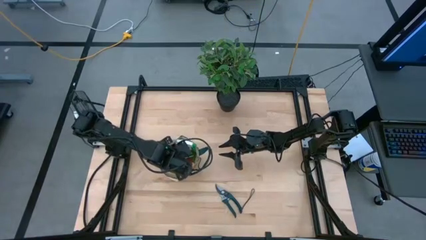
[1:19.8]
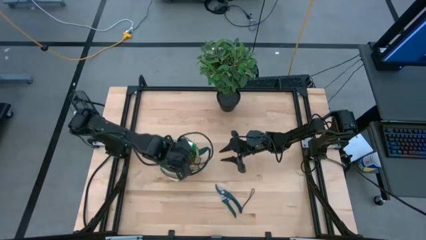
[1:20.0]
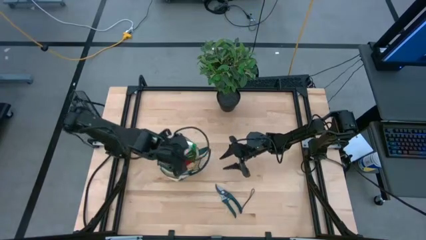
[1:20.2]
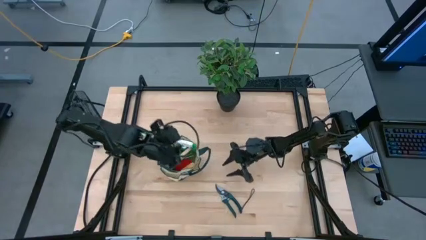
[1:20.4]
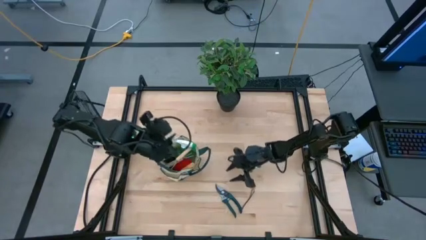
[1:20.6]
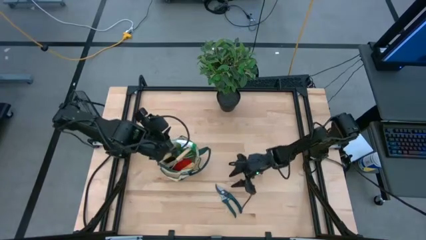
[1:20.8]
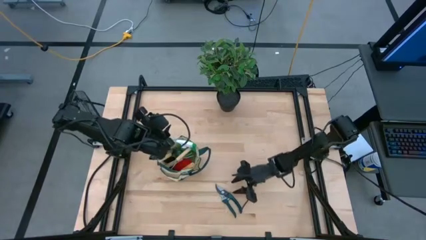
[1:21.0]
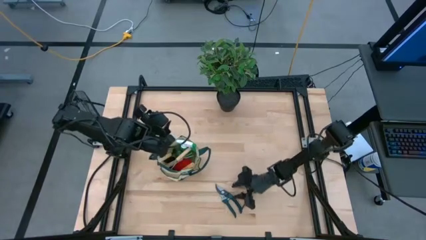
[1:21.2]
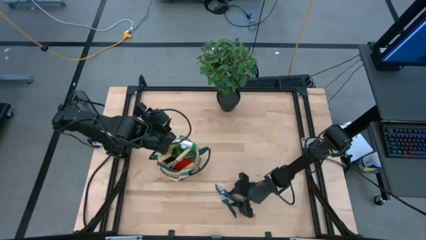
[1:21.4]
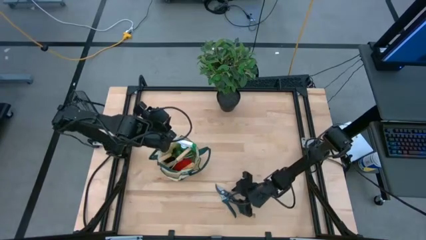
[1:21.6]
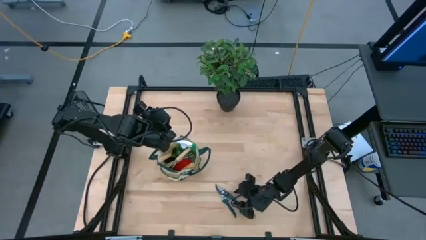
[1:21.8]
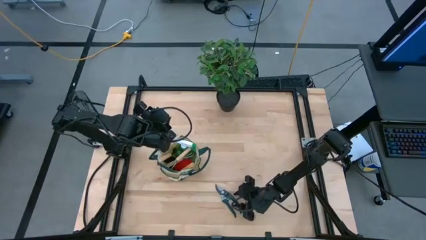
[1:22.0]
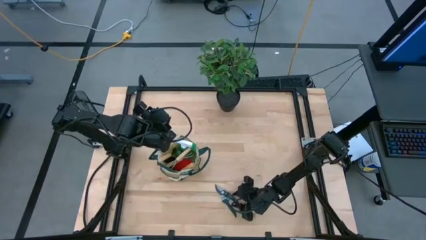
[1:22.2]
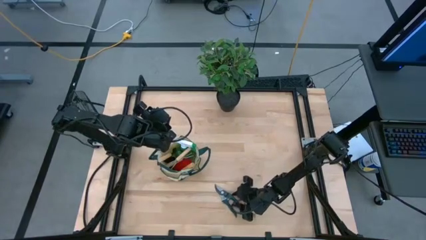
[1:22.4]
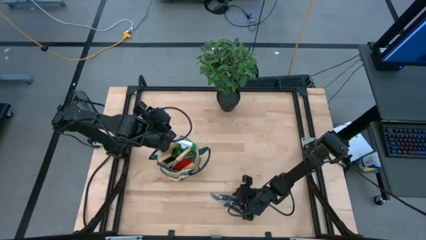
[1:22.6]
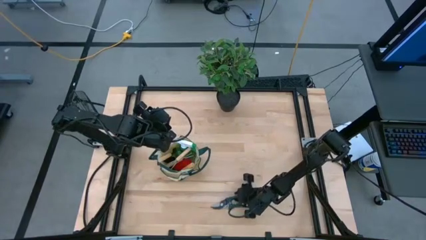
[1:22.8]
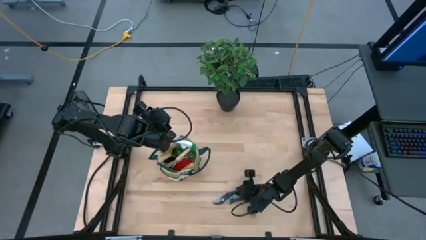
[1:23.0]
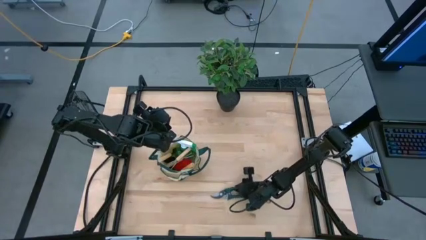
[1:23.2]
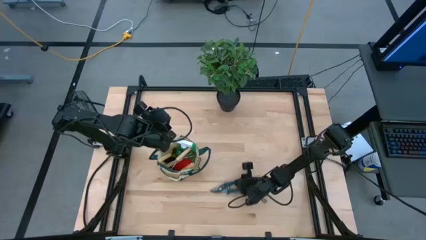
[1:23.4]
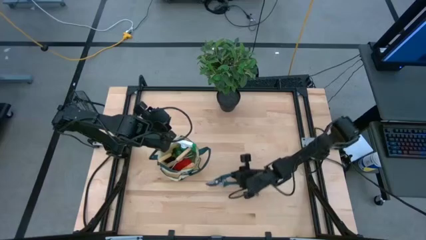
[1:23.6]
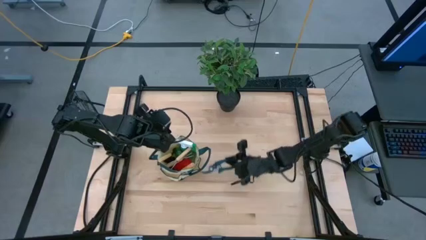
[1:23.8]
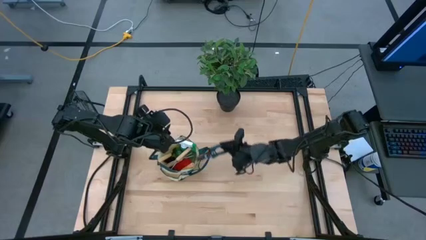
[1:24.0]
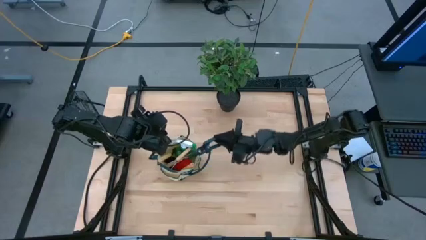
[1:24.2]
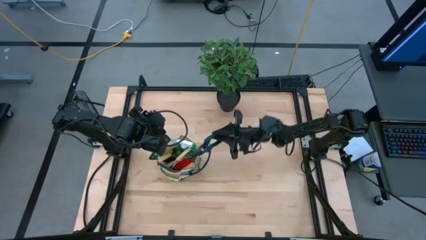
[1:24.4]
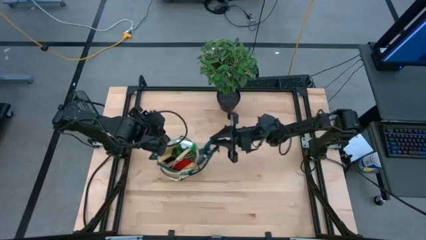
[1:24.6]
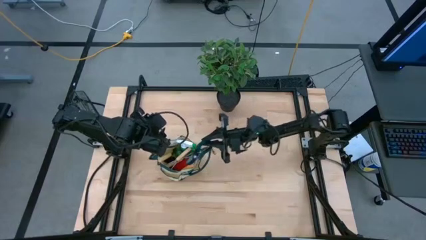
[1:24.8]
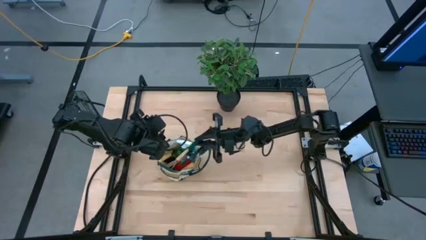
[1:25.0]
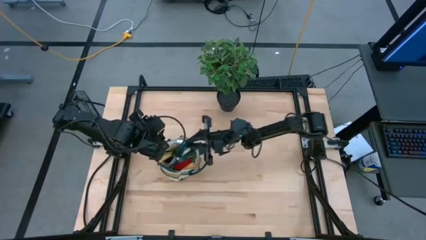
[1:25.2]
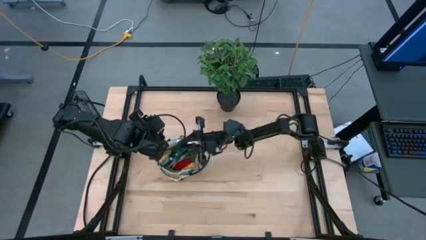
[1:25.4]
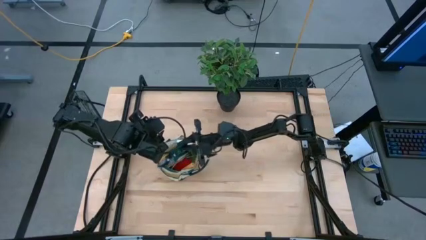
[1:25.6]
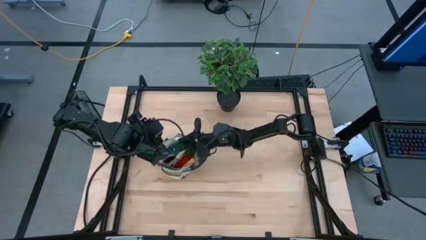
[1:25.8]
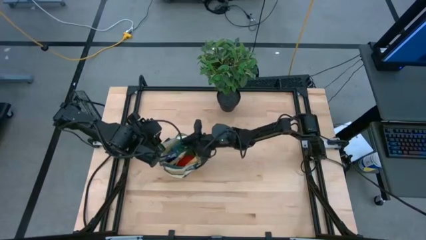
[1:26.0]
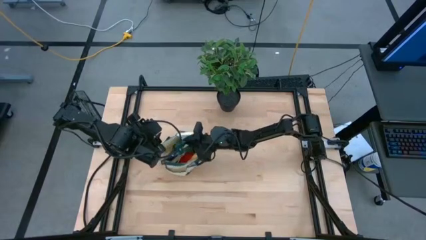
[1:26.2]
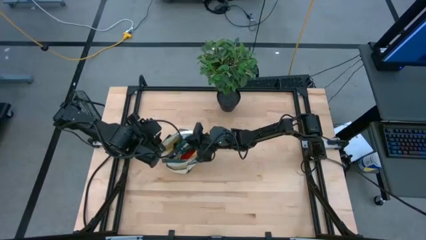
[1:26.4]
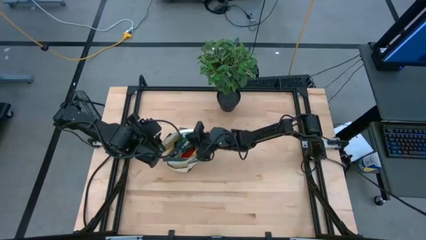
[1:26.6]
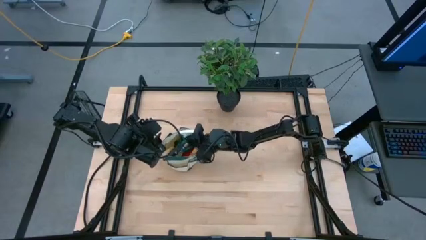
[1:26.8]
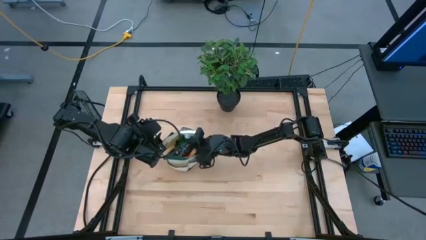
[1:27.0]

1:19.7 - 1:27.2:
Task: Pick & Place Garden tools in Gardening bag
Put the shear scissors in the gardening bag

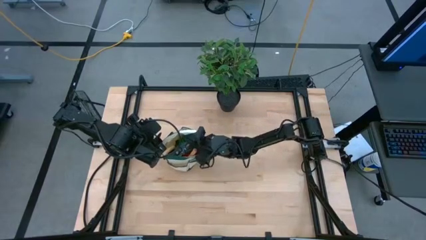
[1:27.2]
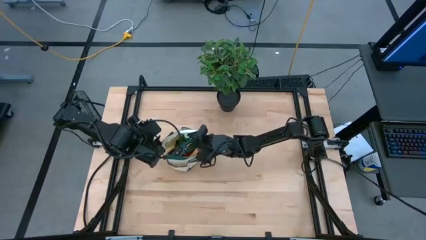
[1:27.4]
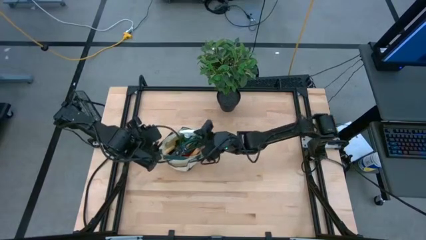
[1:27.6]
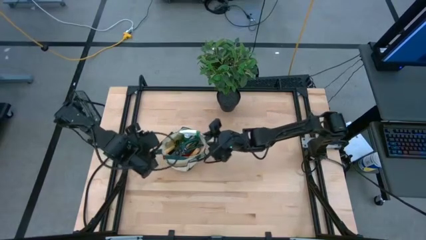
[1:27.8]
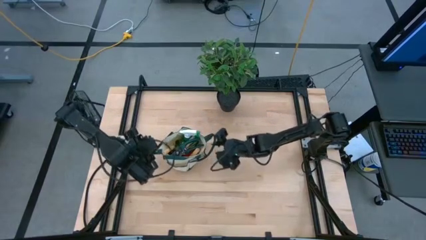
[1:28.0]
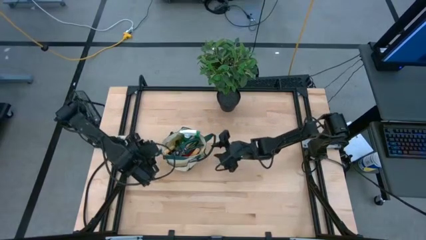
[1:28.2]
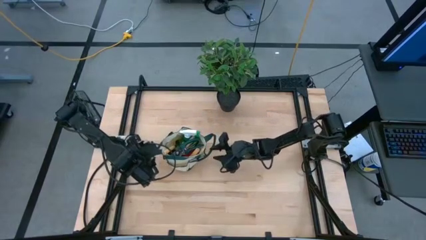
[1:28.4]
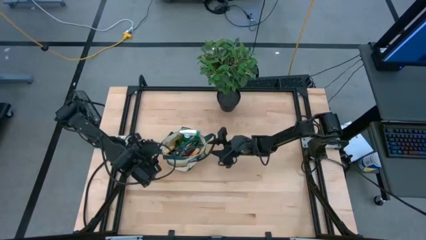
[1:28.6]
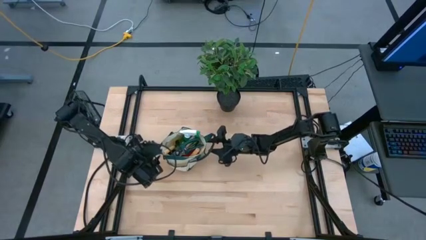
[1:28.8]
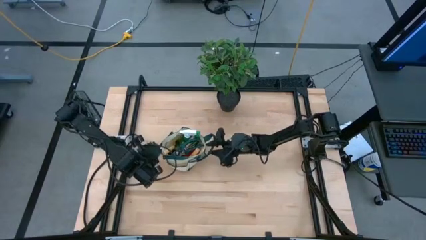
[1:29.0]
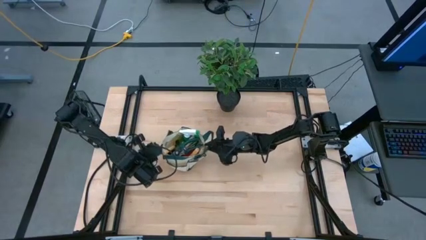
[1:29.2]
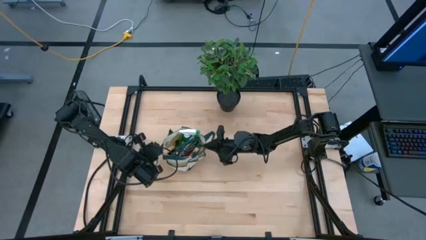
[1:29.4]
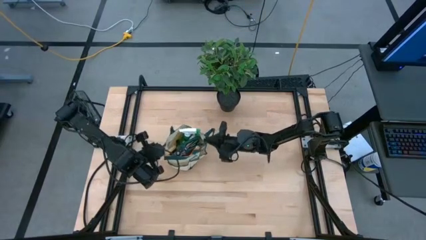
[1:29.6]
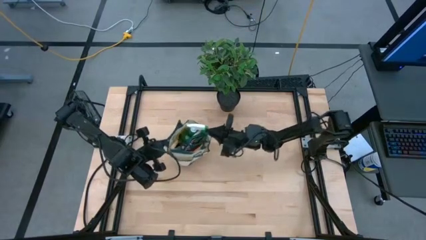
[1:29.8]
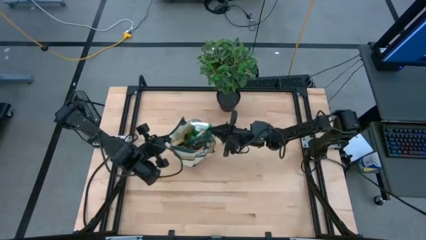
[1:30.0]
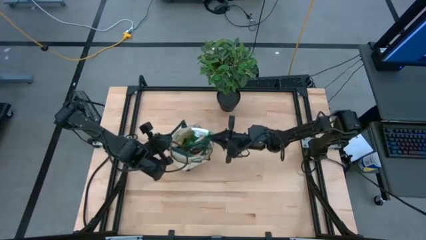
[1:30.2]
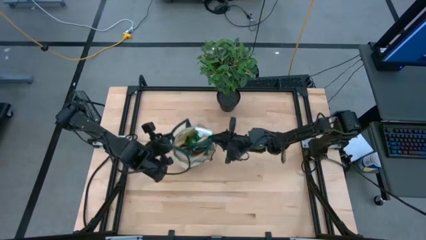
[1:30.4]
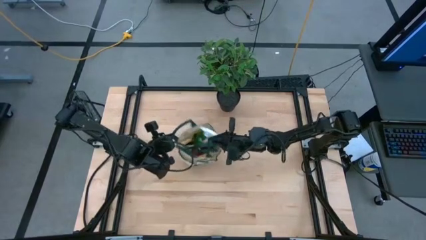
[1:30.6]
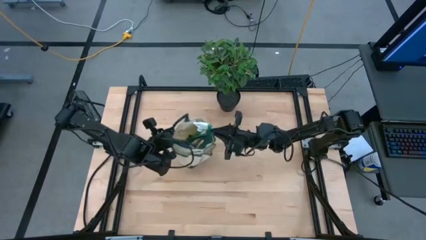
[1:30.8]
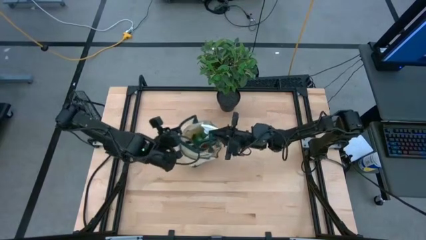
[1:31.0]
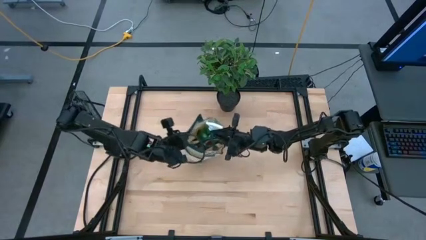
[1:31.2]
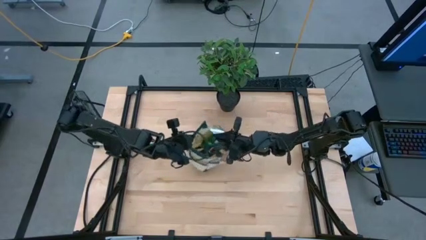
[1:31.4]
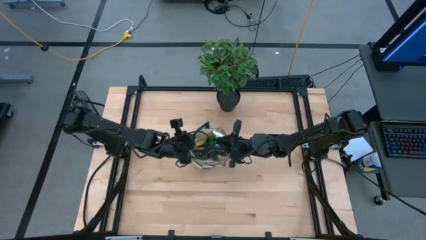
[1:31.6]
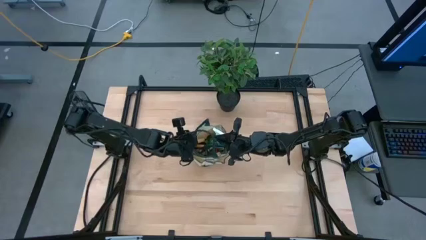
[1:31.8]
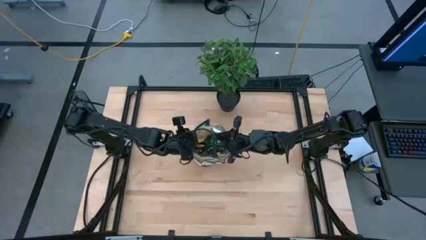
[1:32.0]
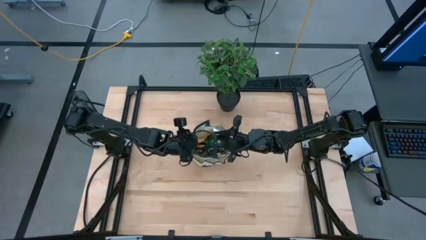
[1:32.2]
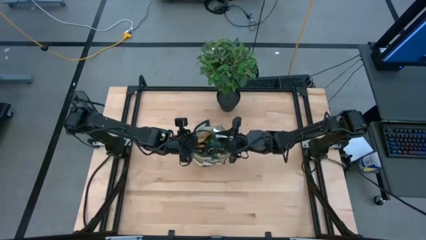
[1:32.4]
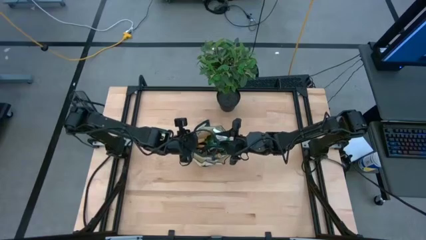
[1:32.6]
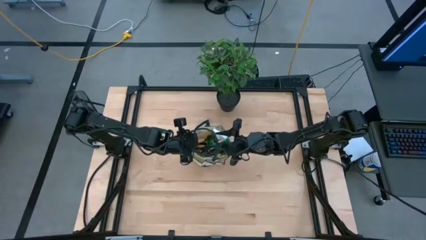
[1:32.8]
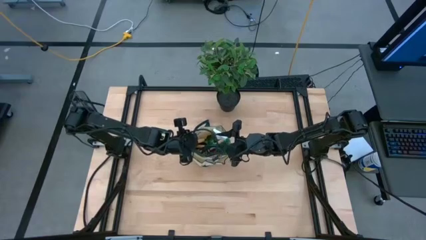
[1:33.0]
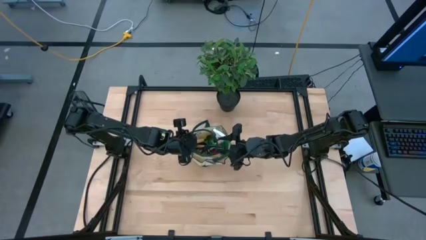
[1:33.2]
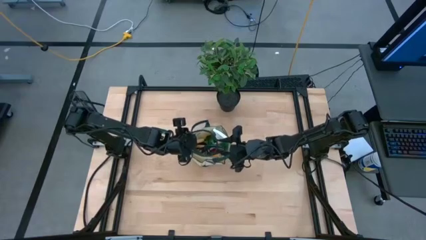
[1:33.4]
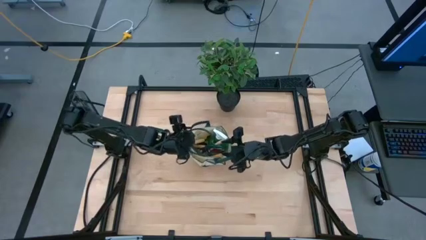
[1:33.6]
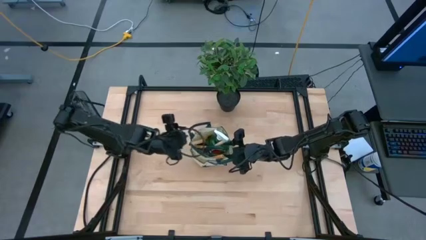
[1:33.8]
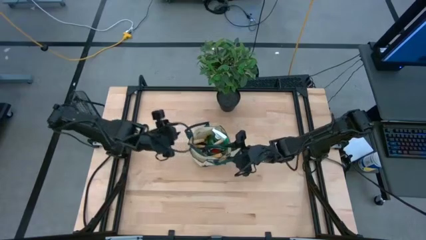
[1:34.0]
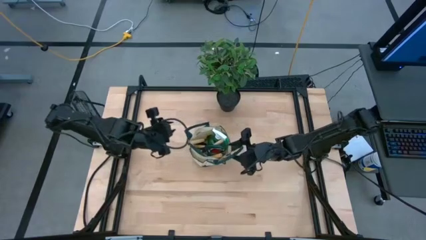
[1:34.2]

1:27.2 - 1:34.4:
Adjust the gardening bag

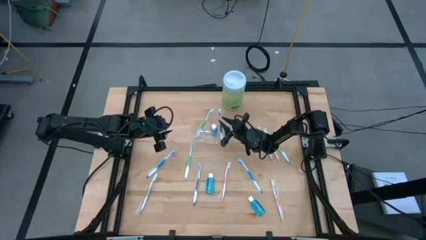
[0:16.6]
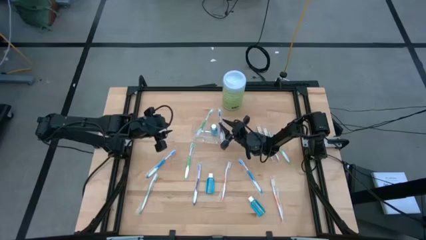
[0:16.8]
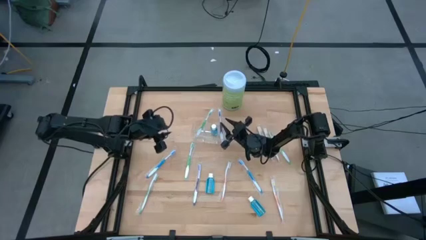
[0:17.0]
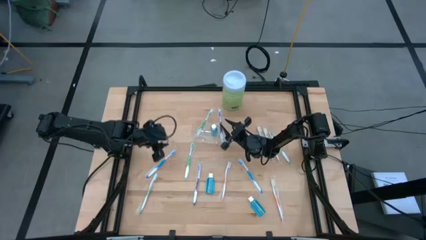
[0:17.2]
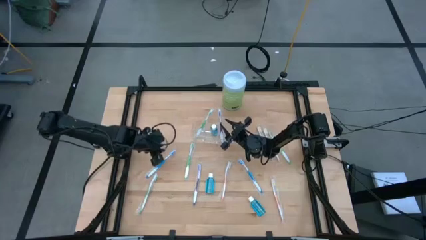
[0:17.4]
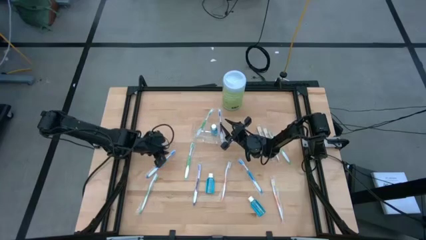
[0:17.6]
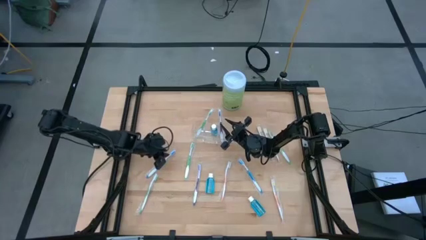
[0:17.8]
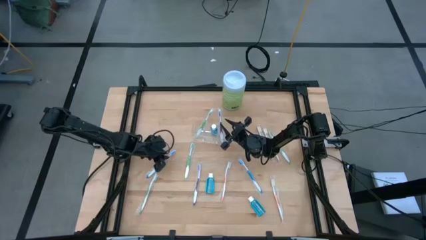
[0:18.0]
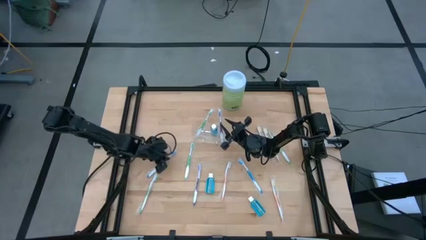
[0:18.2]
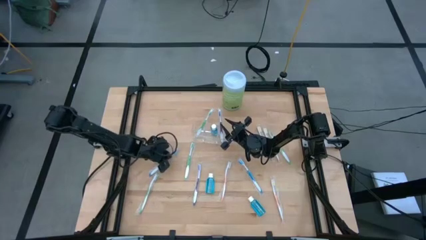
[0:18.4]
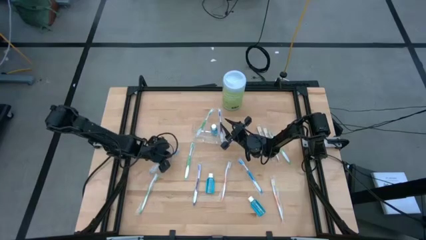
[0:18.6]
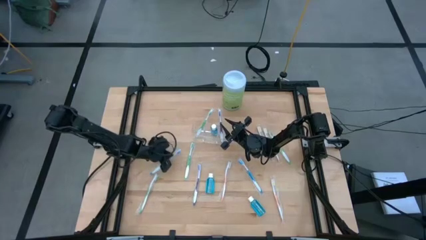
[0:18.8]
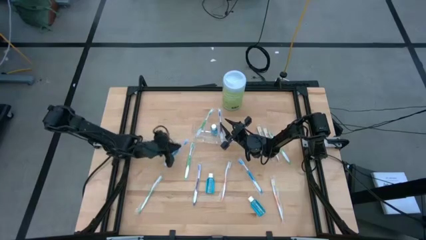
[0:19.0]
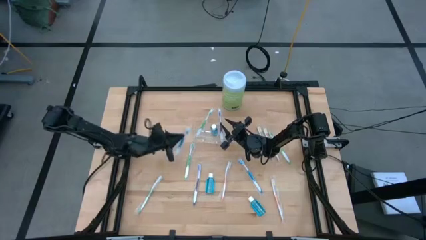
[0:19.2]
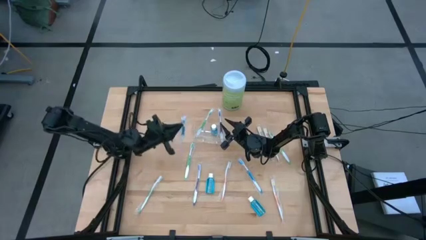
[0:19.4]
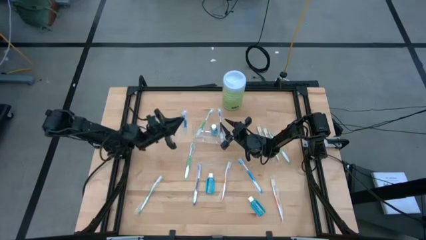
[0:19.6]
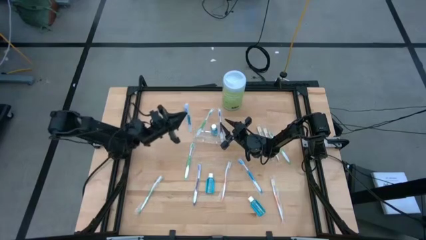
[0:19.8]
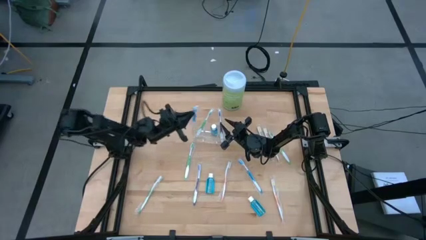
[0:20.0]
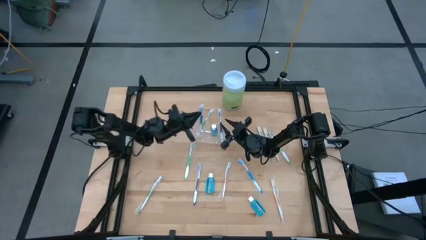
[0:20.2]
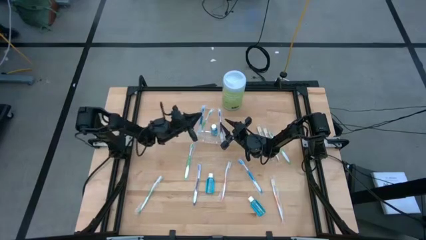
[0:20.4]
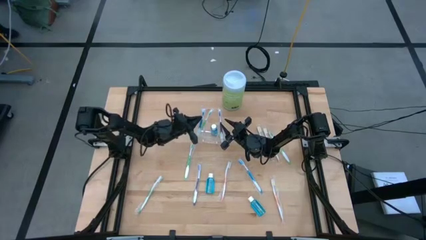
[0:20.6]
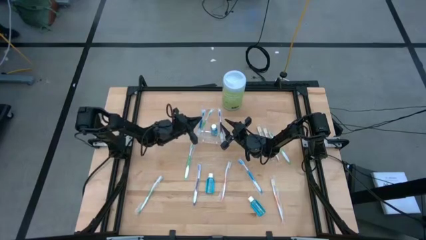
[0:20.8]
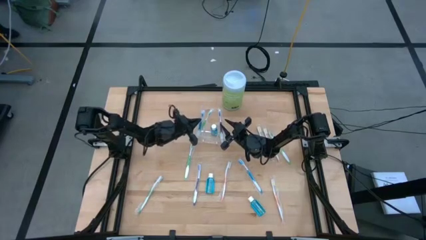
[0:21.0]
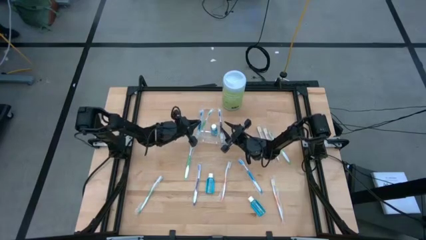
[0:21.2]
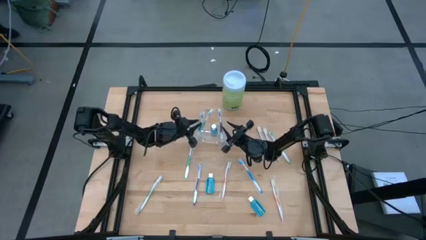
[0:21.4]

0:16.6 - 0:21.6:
Task: Pick & Place toothbrushing station
Put the blue toothbrush into the transparent organizer
